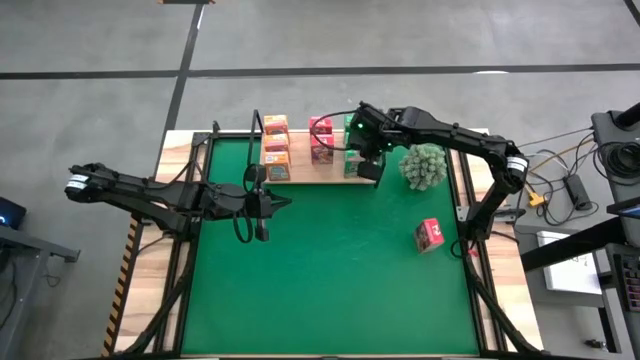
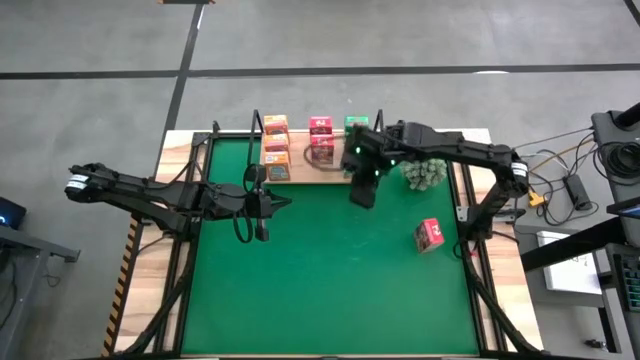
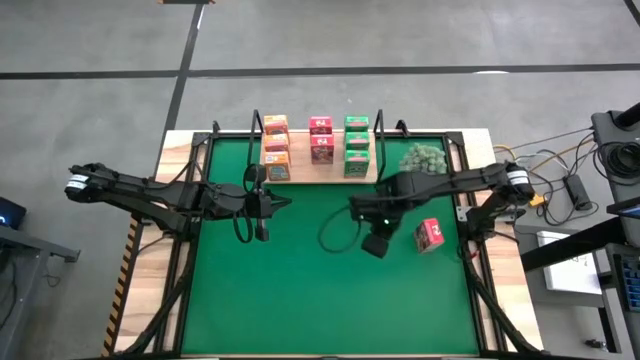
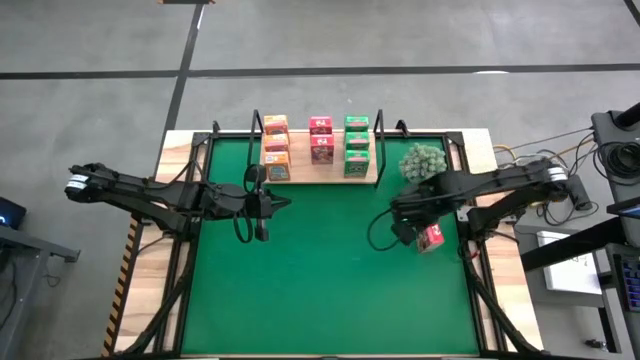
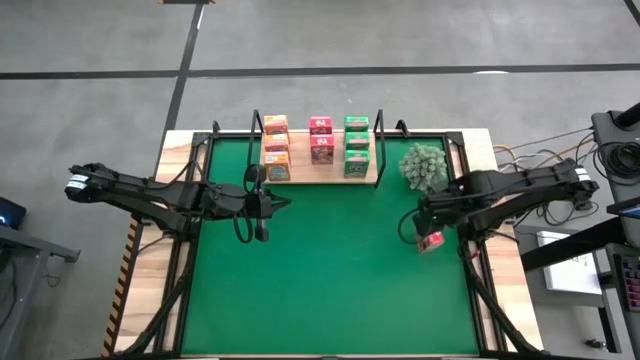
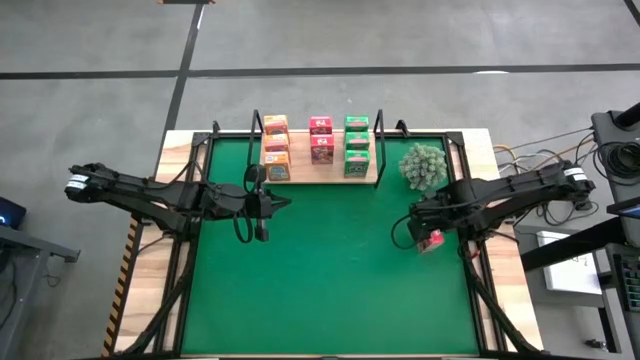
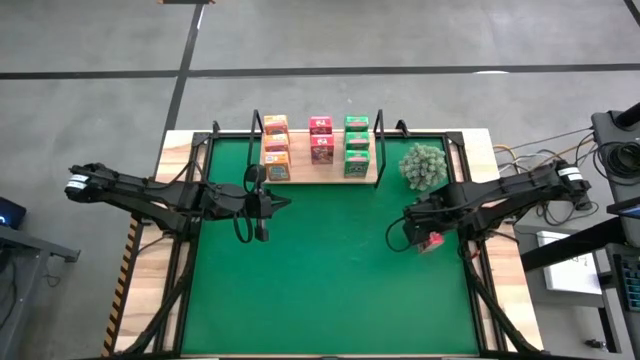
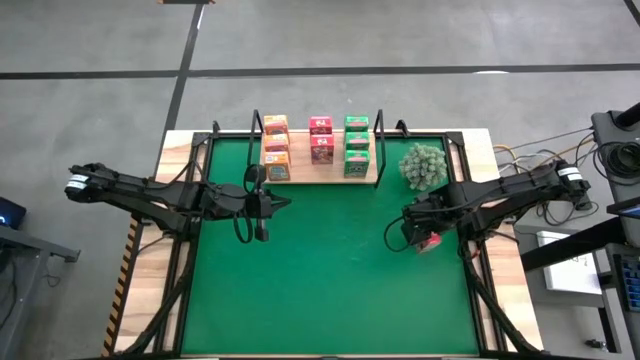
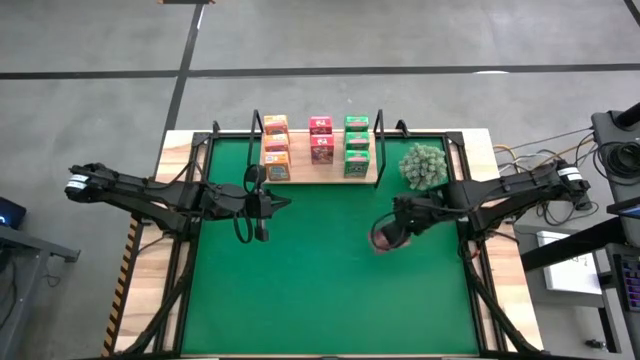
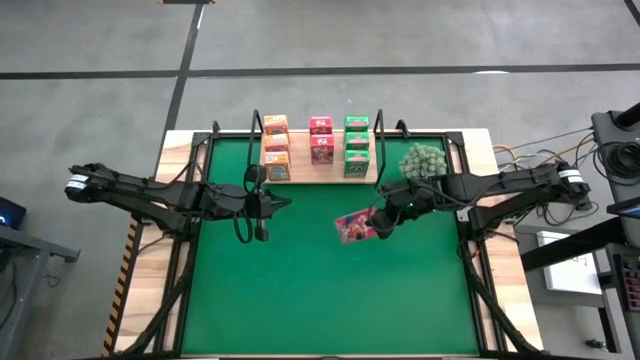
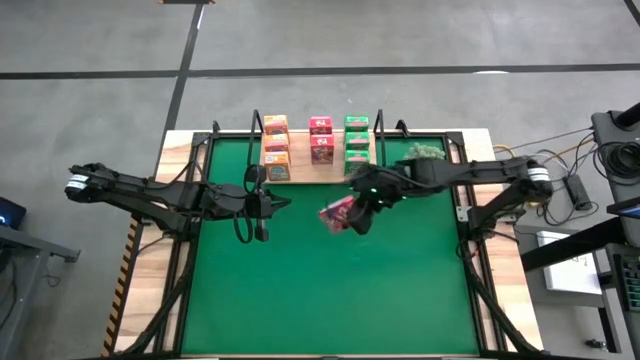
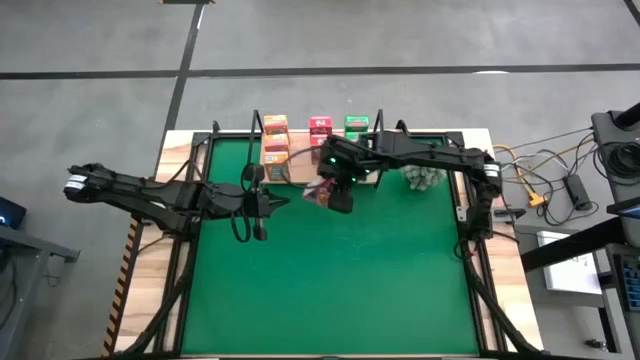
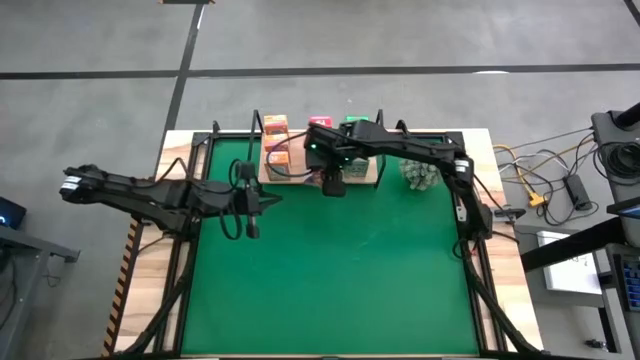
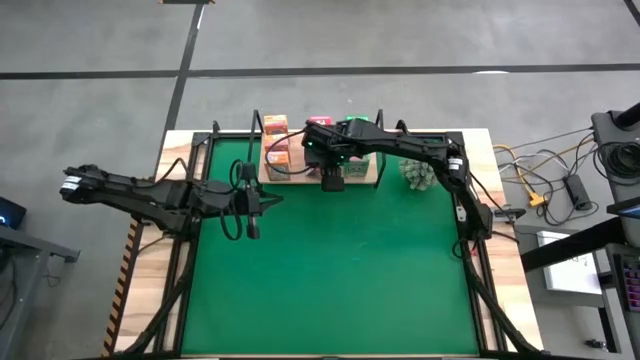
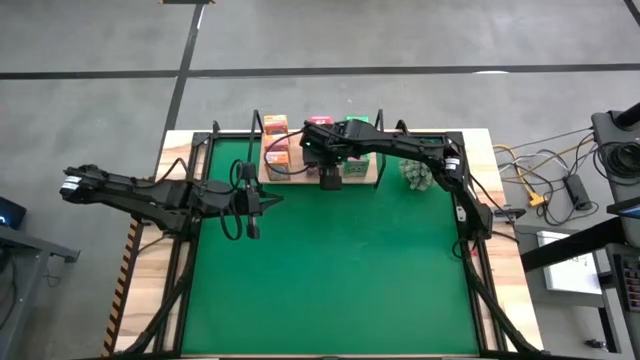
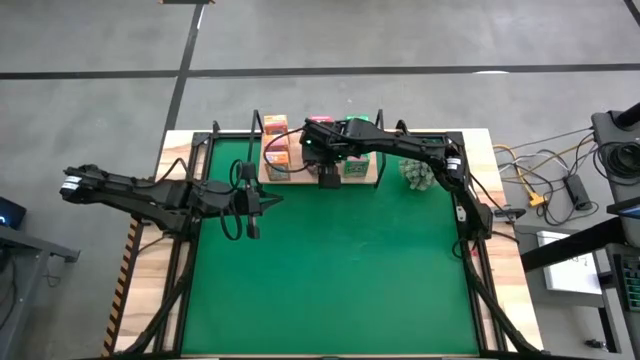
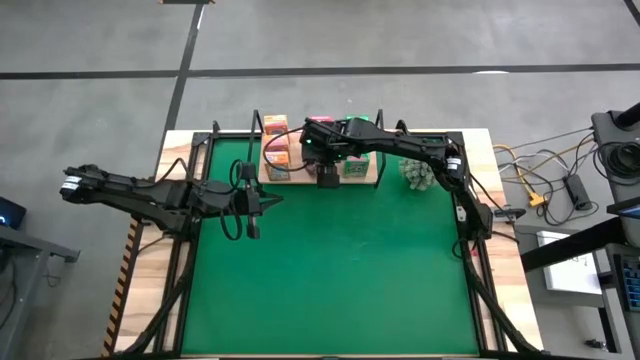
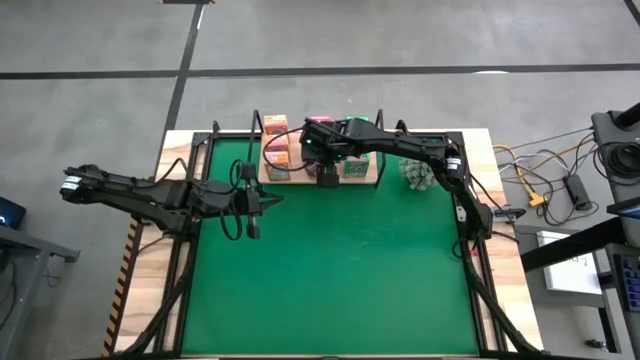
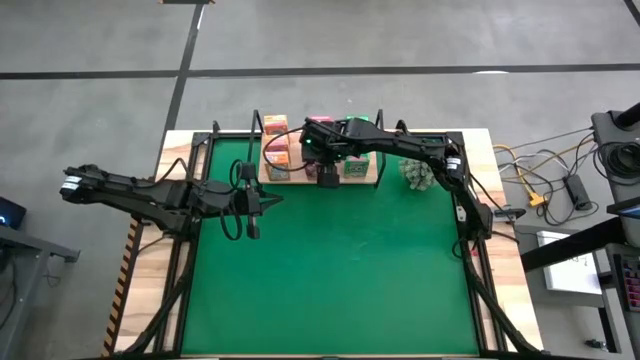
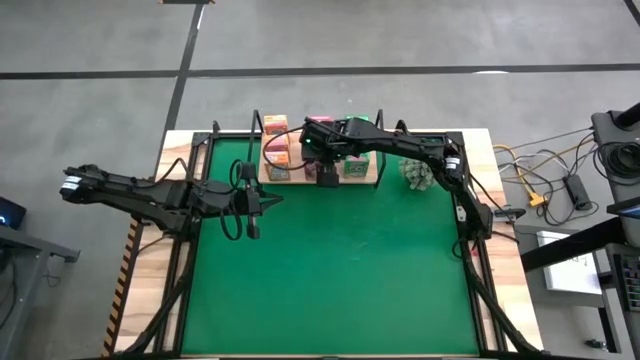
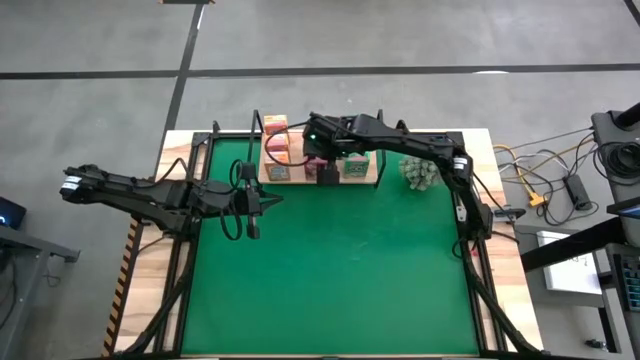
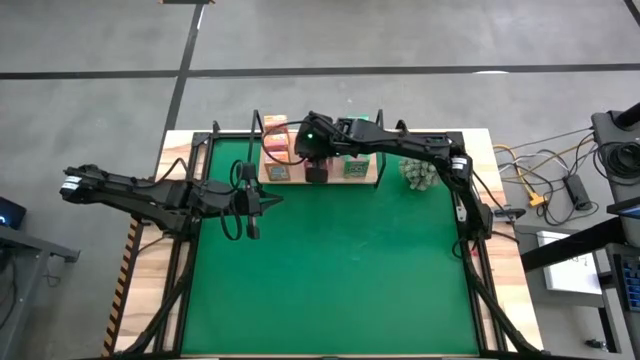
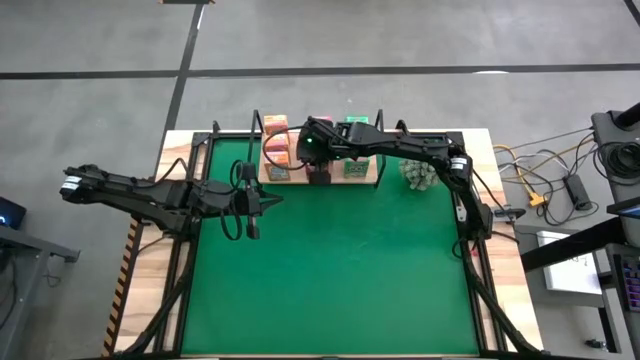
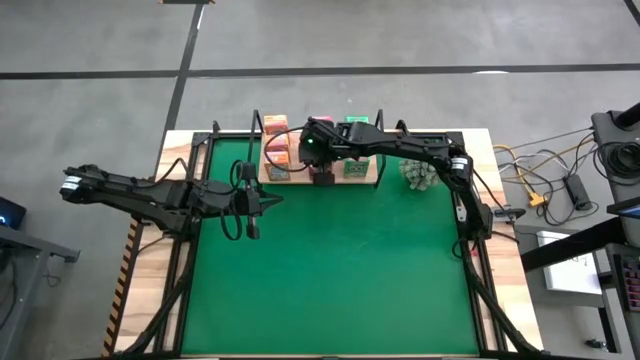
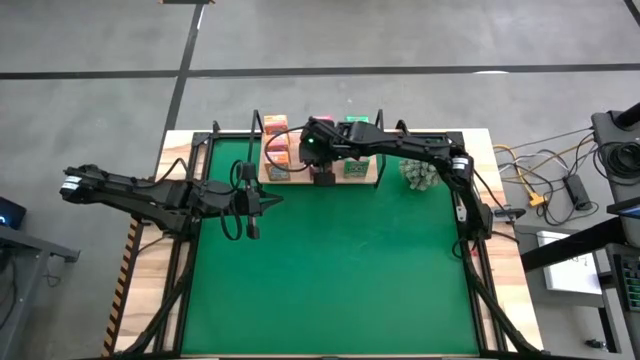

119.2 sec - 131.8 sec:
Task: Stack cereal on shelf
Put the red cereal box on the shelf and aligned with the other red cereal boxes

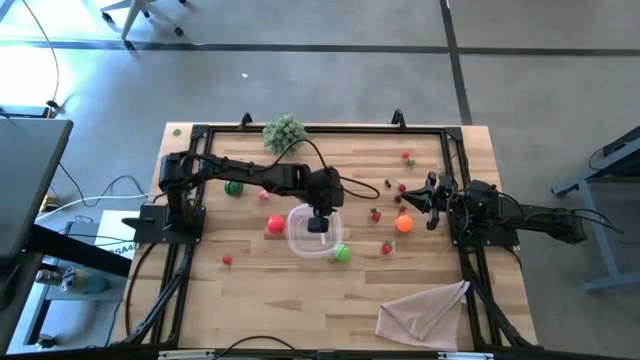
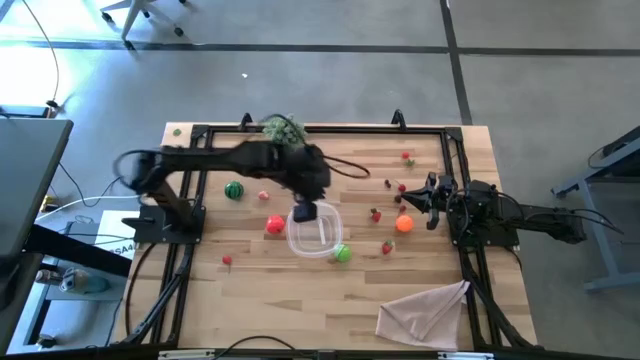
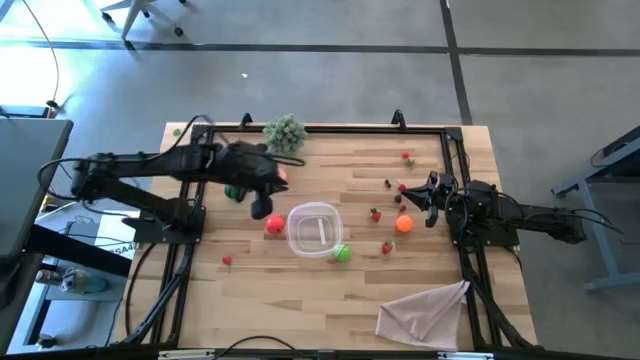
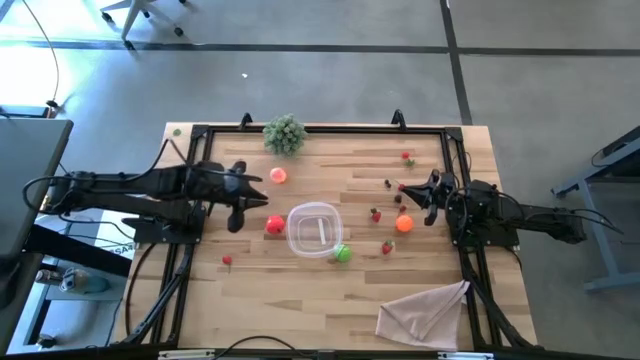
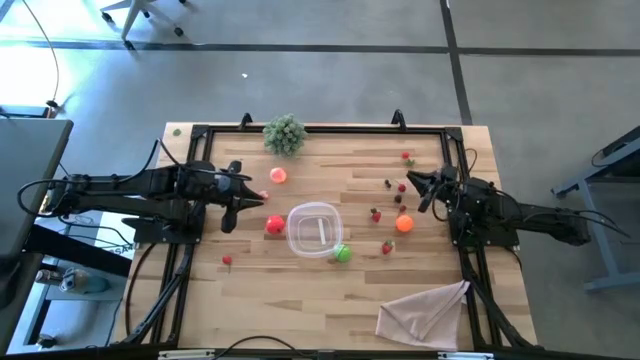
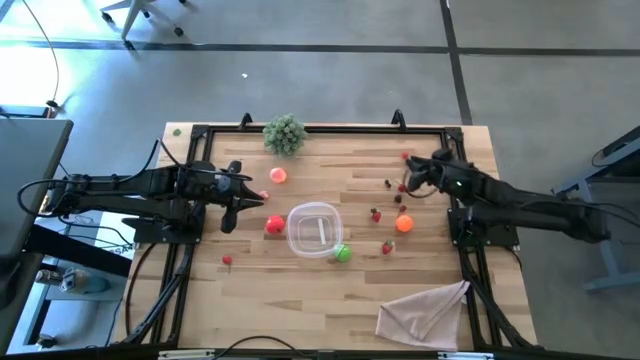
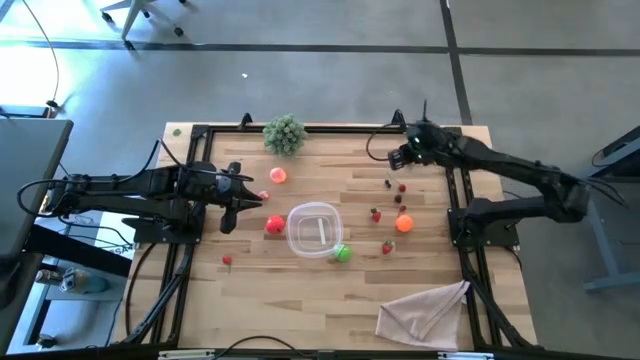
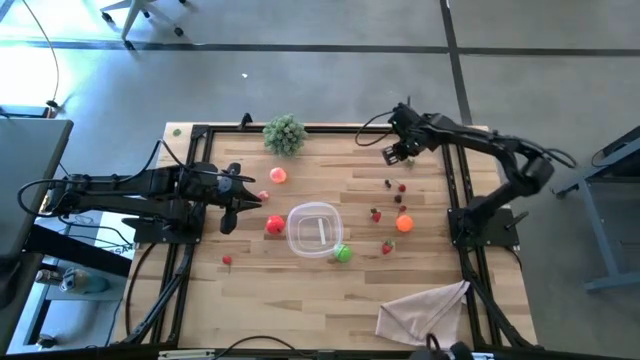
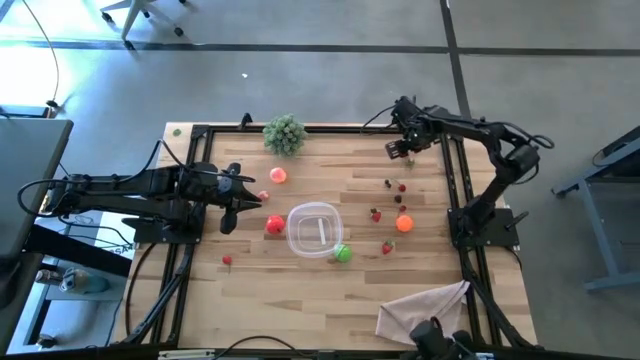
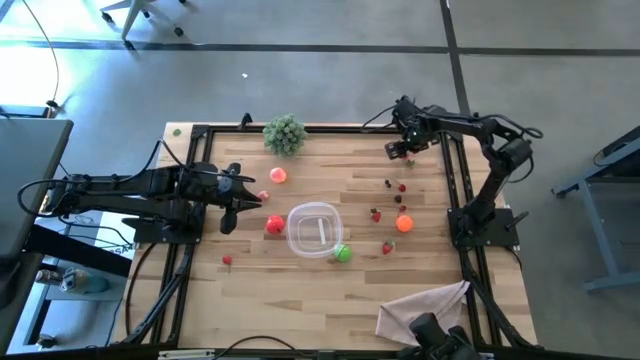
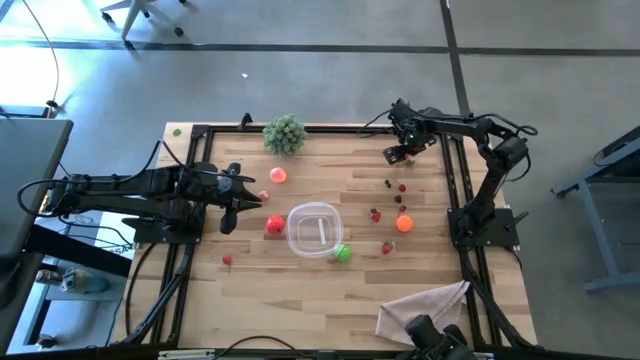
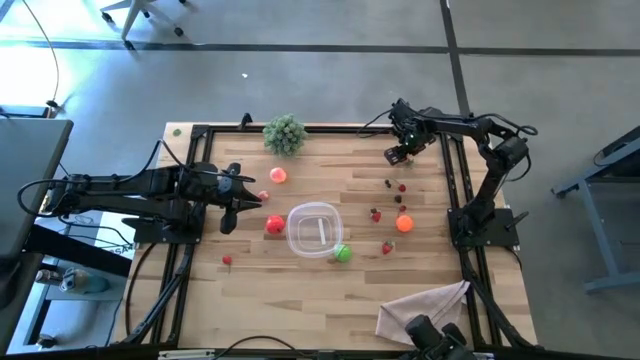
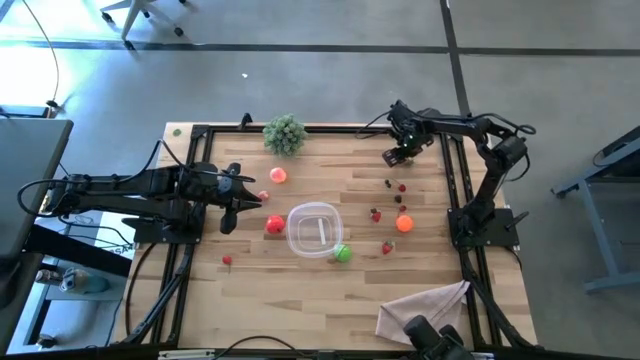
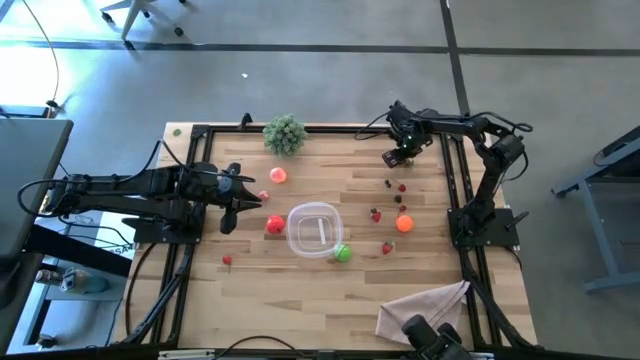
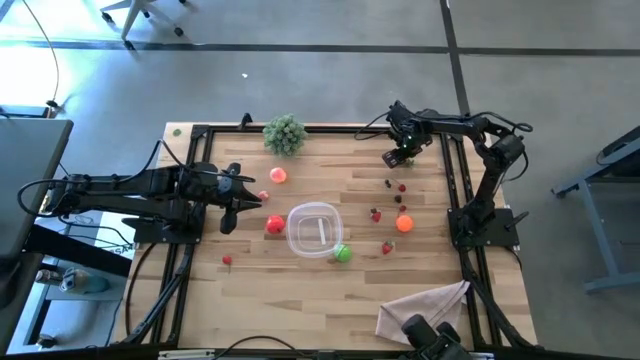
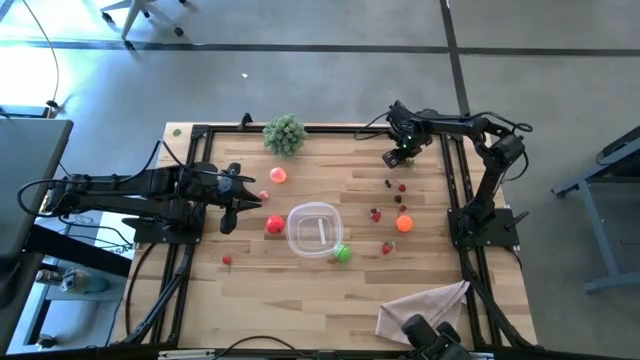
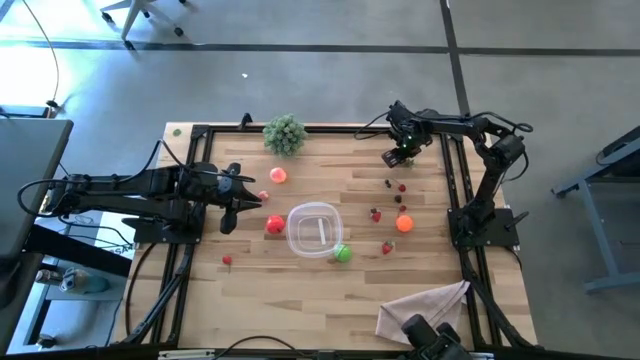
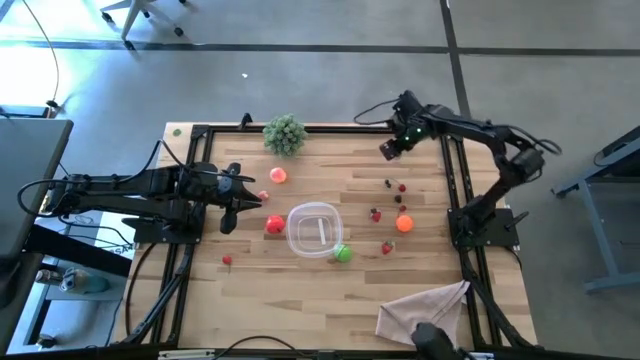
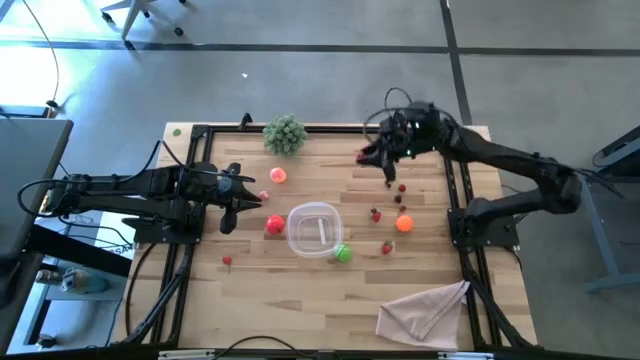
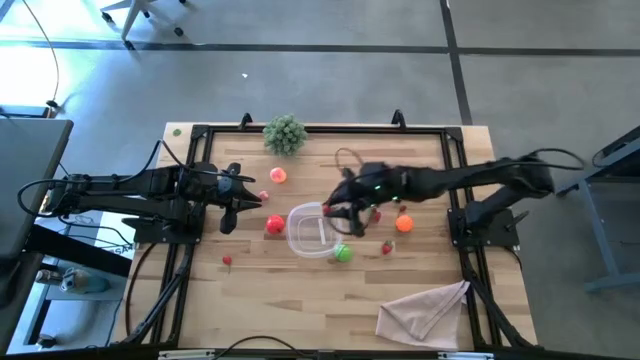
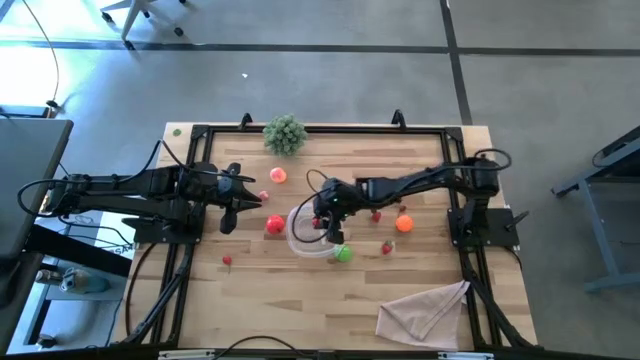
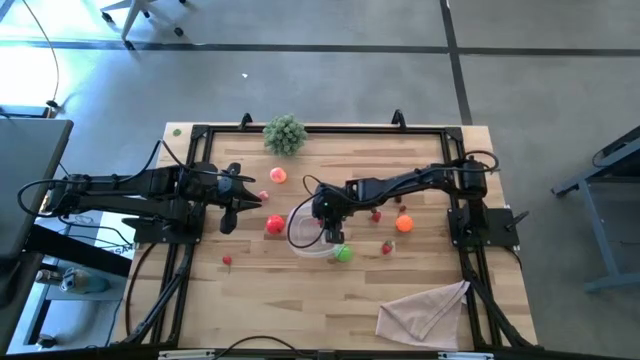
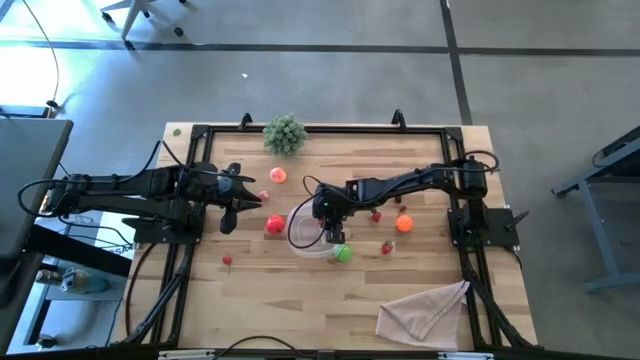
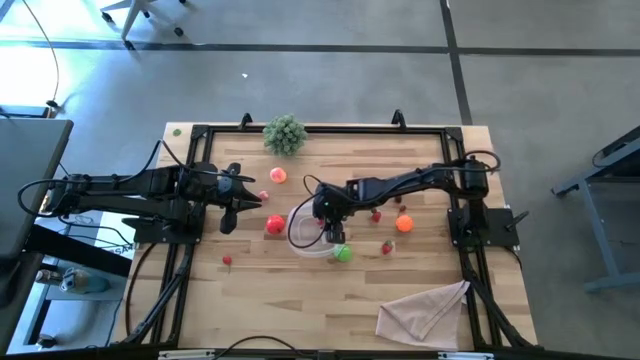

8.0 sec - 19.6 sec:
Task: Pick and placing Produce into tupperware
Put the cherry tomato into the transparent bin
